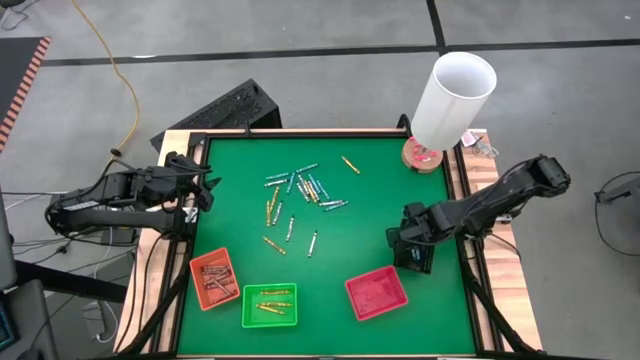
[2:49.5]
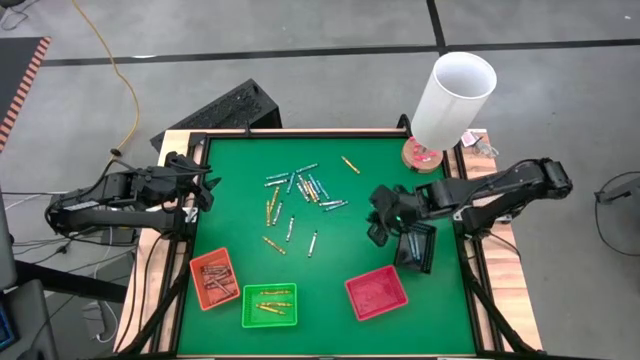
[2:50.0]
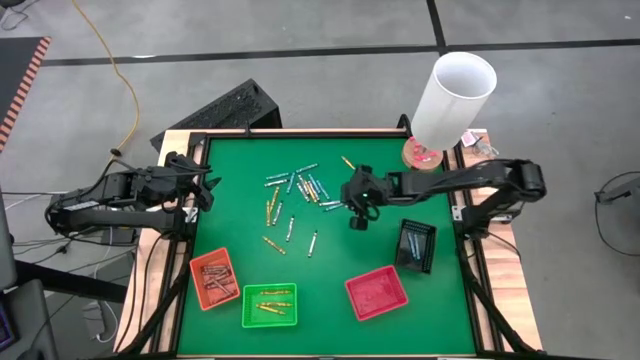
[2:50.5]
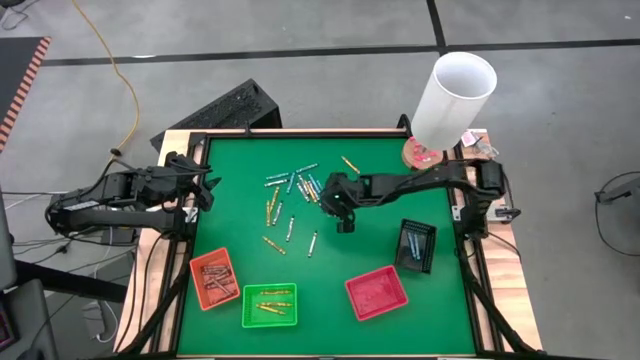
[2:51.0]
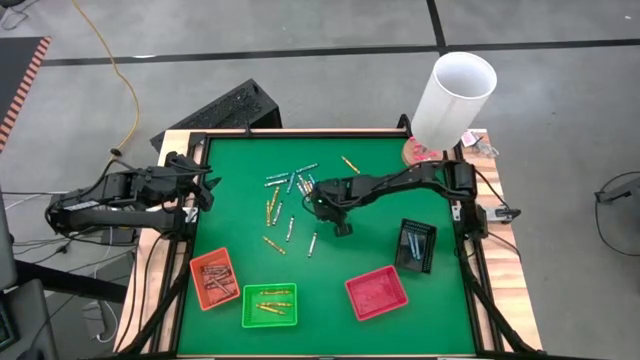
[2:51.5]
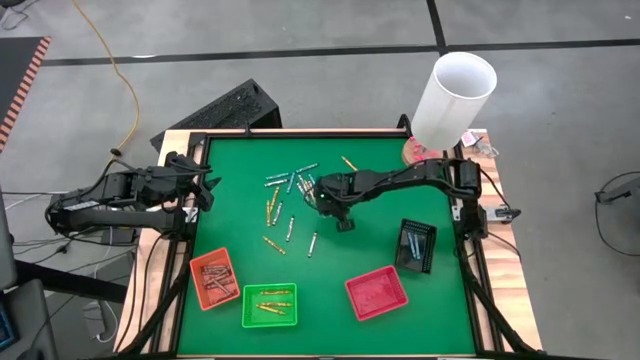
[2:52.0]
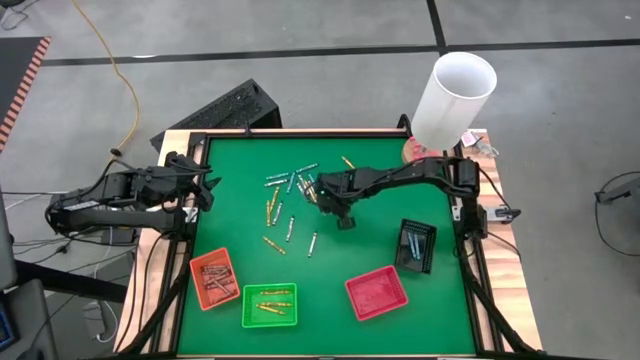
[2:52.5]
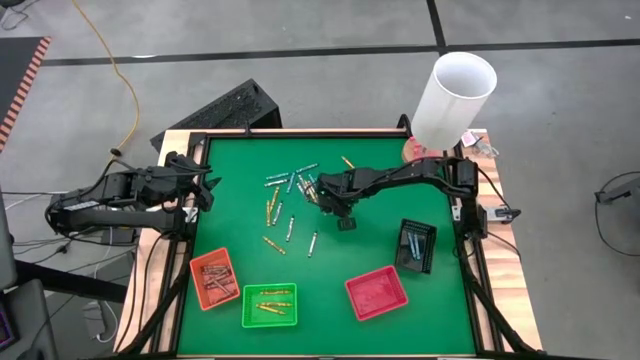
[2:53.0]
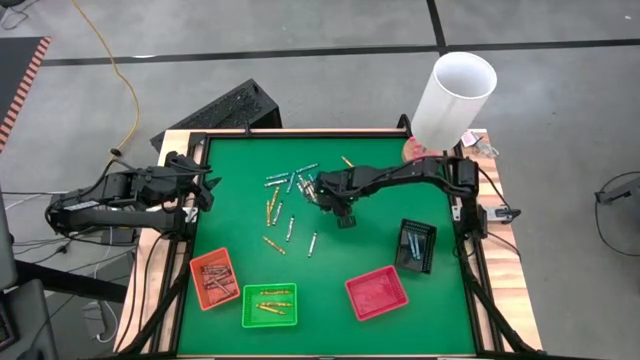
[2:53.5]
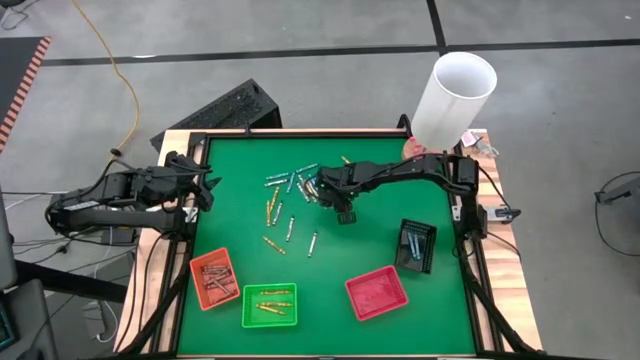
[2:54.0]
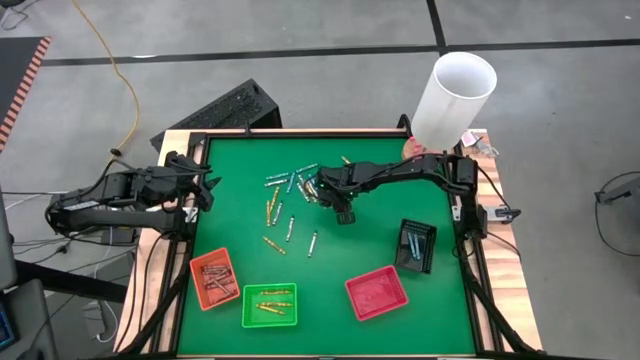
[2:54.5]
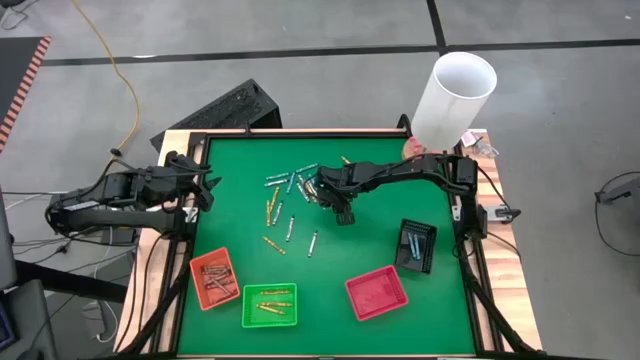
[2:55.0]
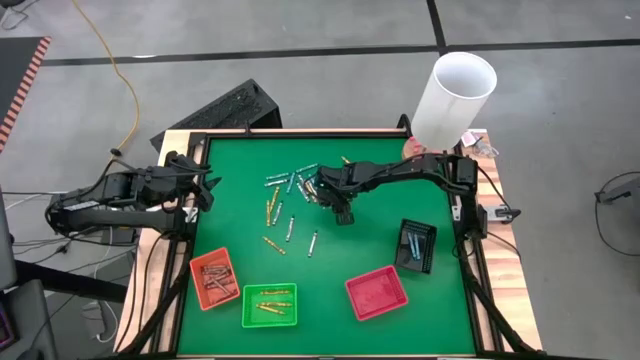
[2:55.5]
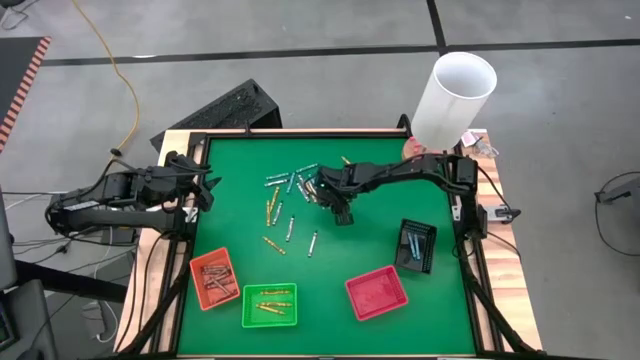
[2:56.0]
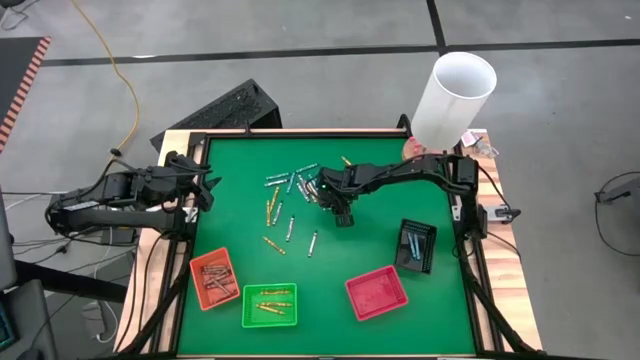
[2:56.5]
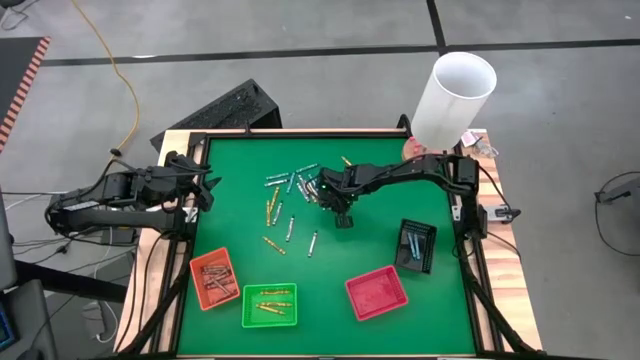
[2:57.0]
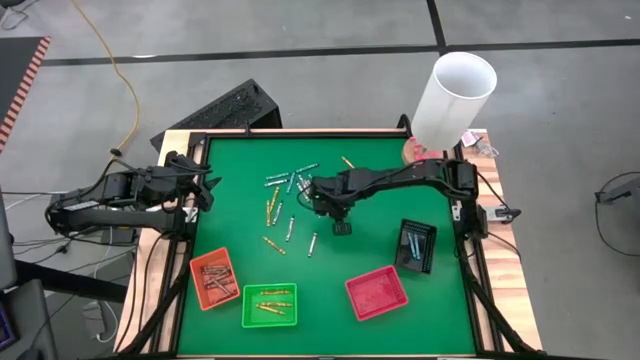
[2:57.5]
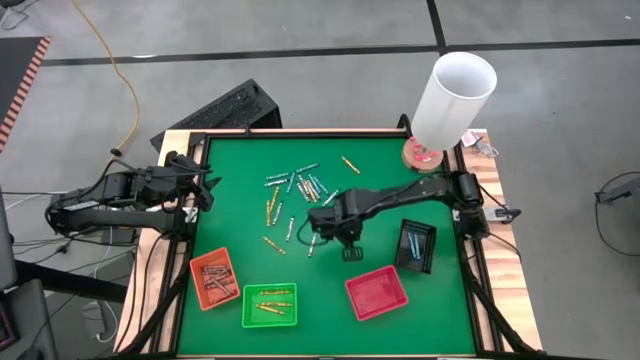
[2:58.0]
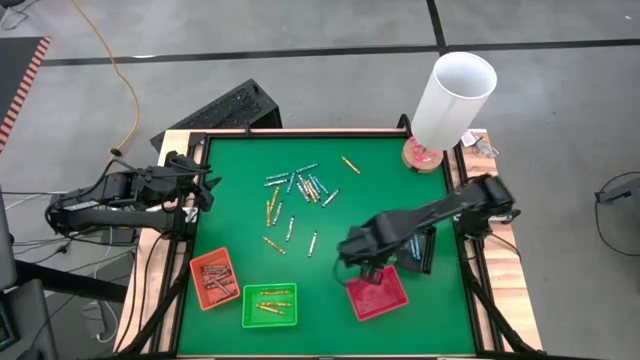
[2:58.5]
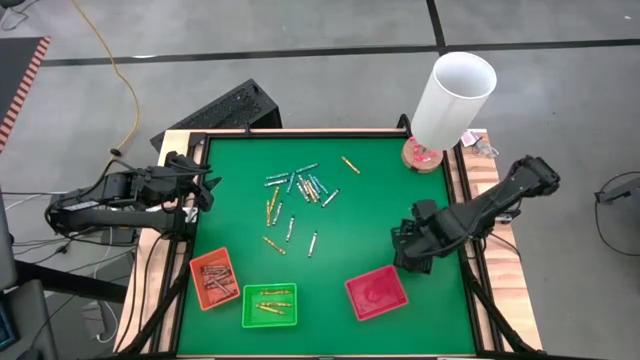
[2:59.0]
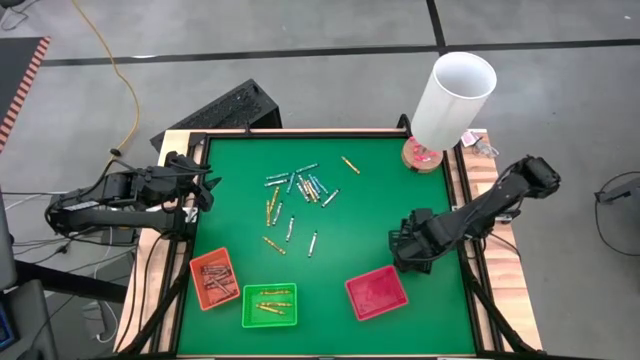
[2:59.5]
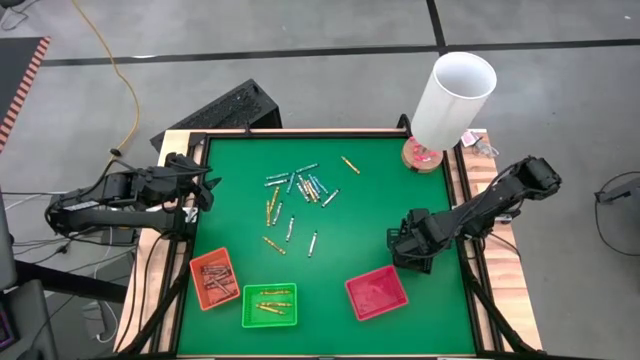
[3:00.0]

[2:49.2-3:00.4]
Task: Sort crayons
Put the blue crayon into the black bin

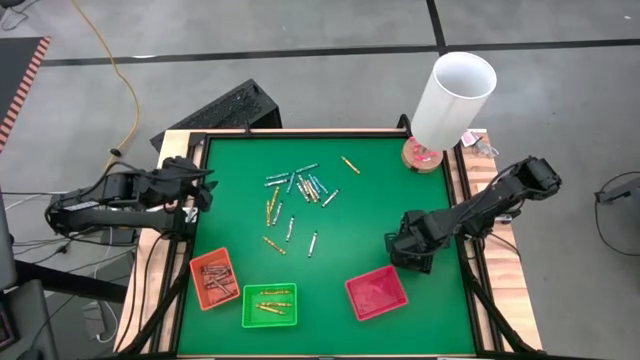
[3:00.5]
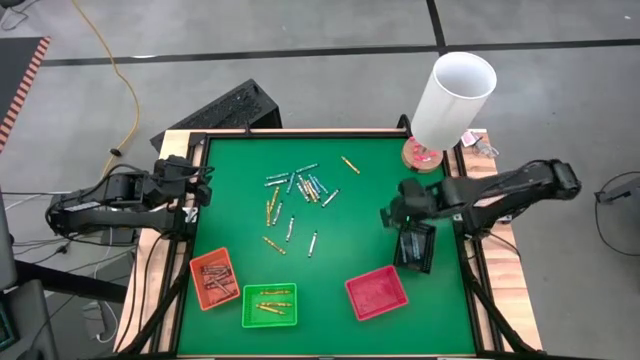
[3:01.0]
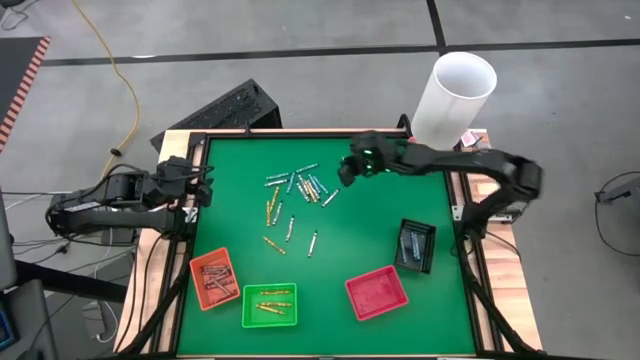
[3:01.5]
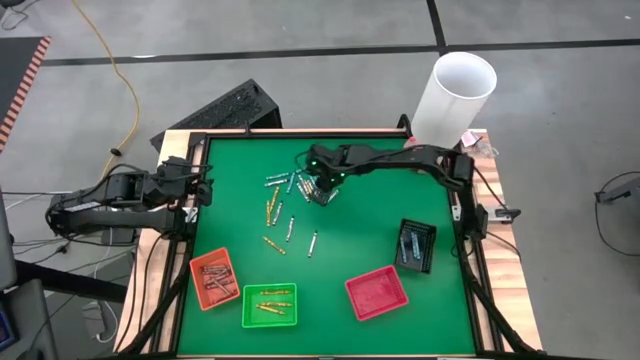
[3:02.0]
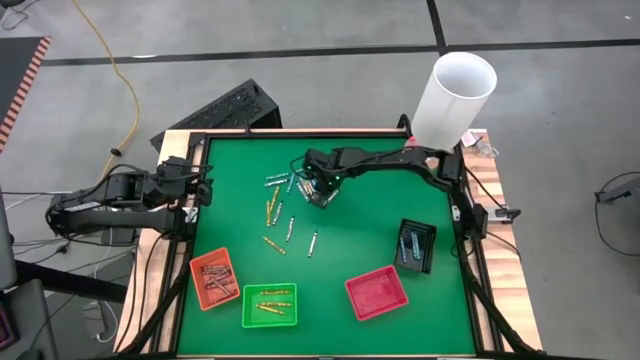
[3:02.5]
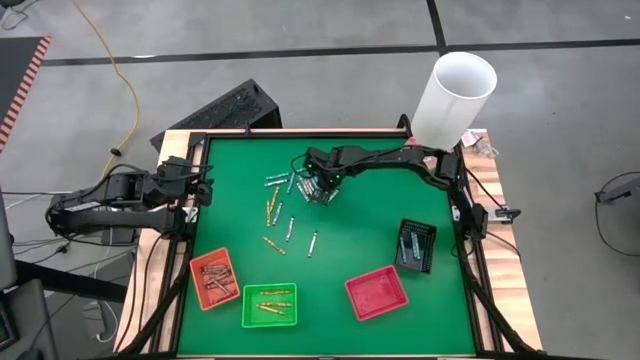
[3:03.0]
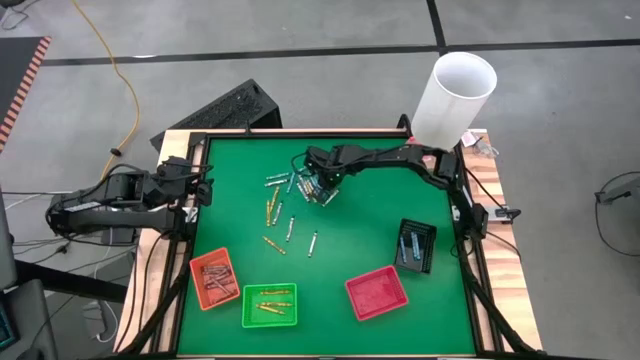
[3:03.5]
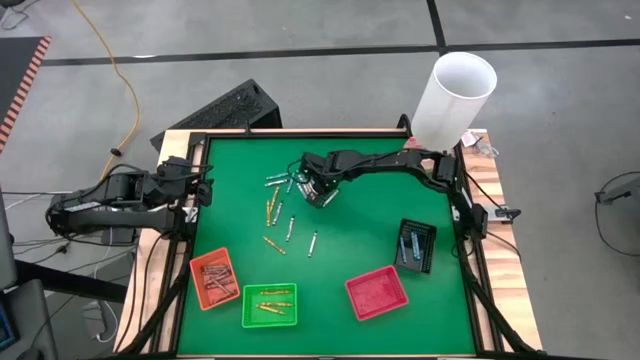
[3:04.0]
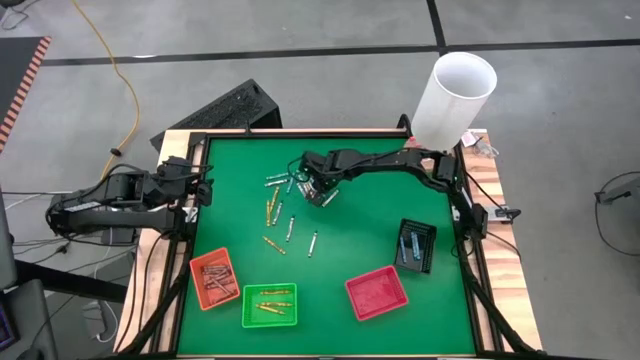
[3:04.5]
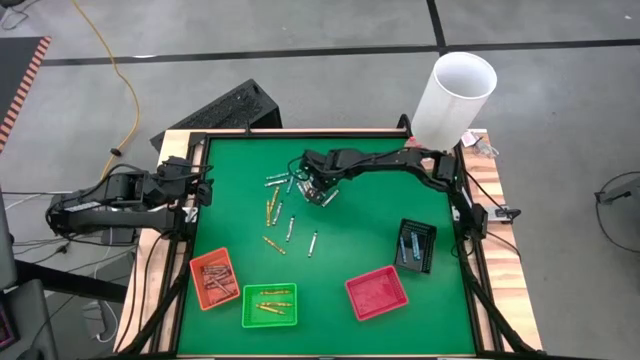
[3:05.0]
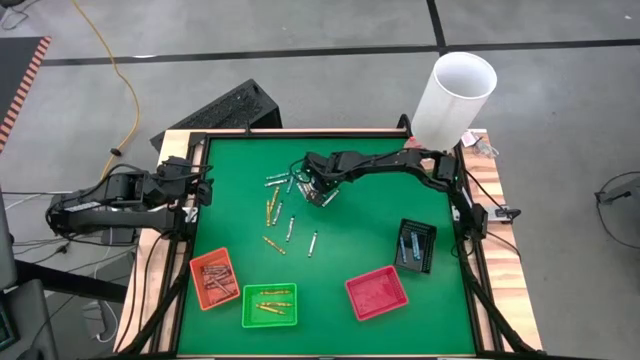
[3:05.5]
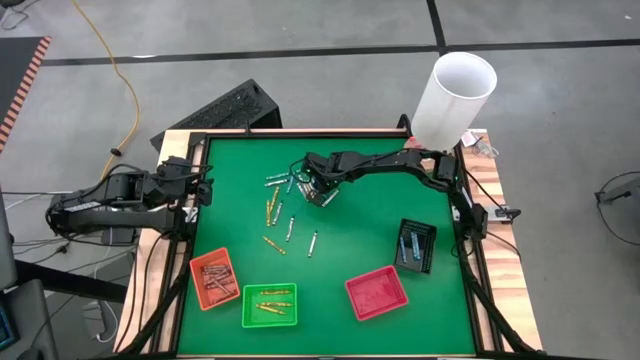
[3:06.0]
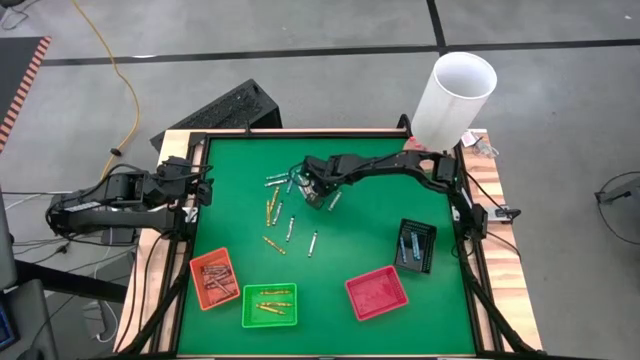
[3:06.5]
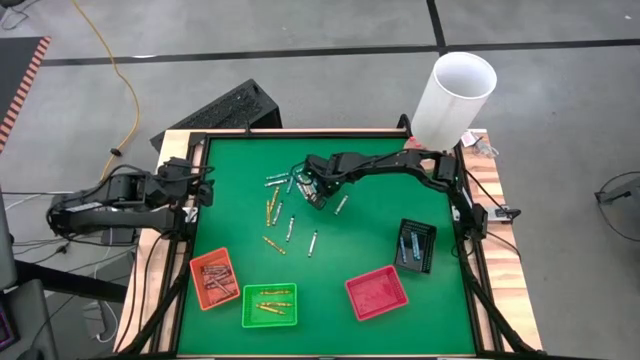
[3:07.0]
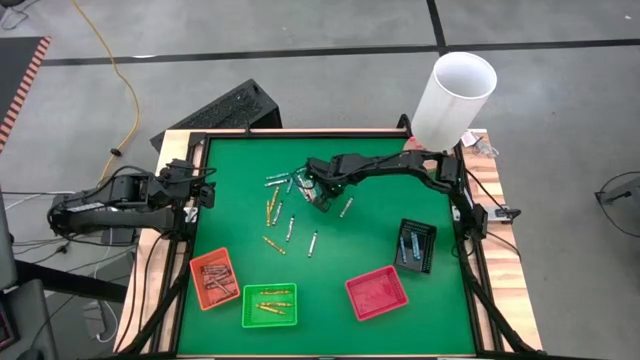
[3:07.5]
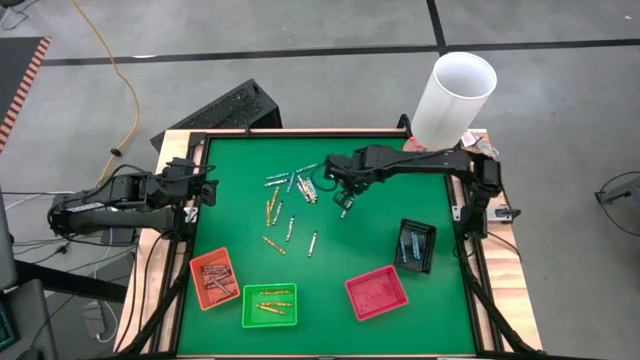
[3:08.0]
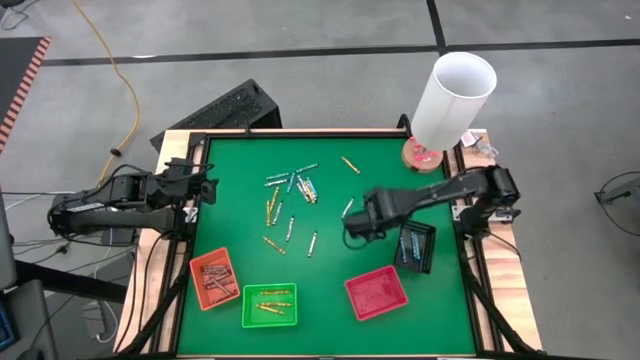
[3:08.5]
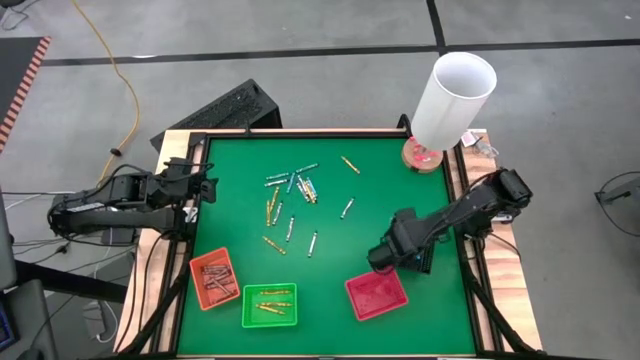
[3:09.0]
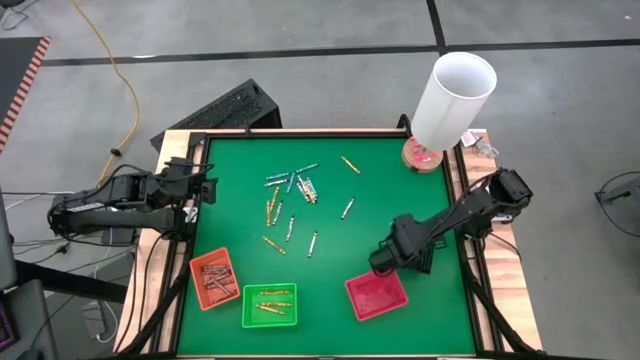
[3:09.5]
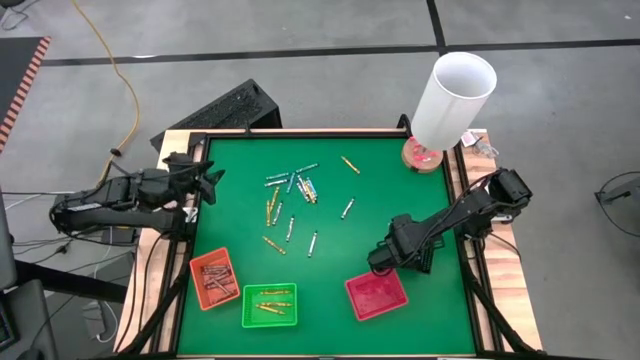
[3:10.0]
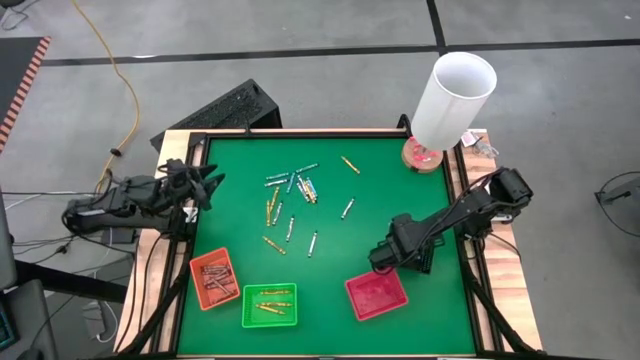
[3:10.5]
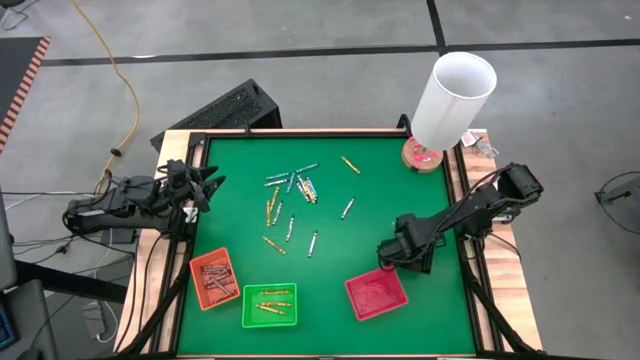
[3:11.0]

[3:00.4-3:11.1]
Put the blue crayon into the black bin
